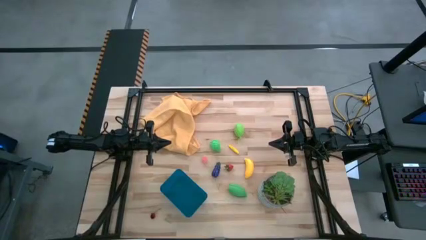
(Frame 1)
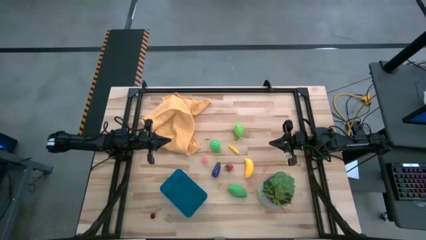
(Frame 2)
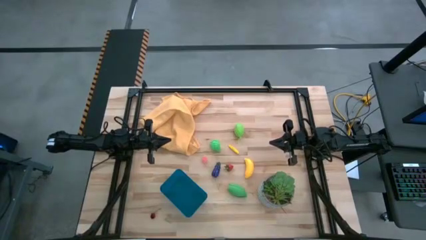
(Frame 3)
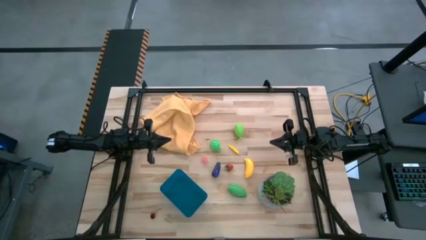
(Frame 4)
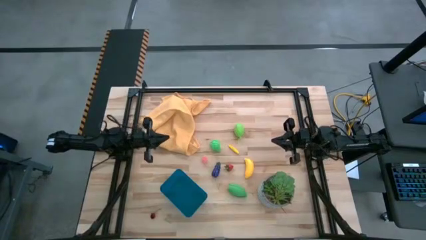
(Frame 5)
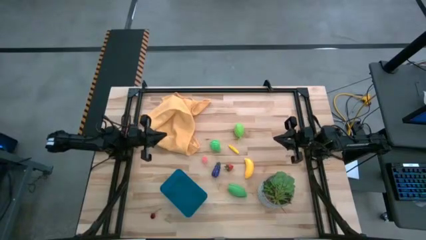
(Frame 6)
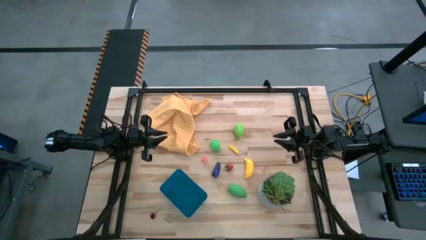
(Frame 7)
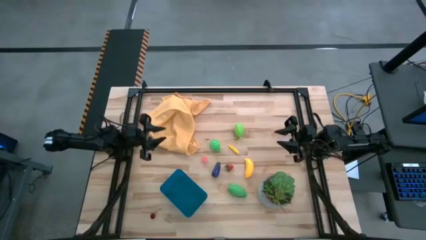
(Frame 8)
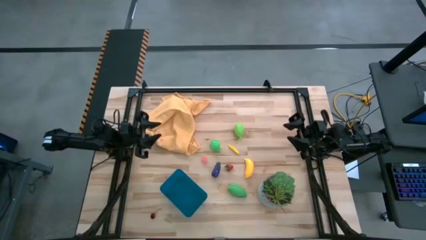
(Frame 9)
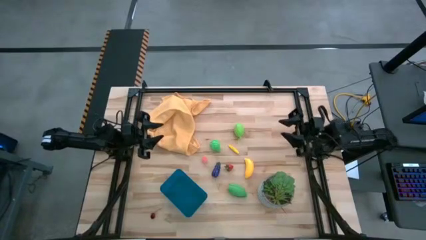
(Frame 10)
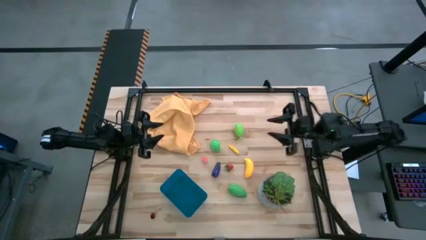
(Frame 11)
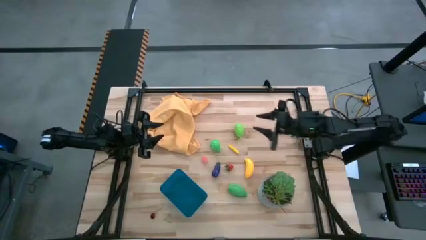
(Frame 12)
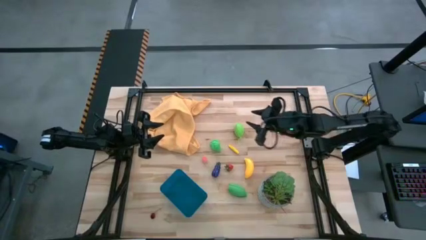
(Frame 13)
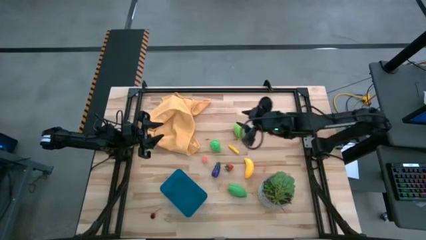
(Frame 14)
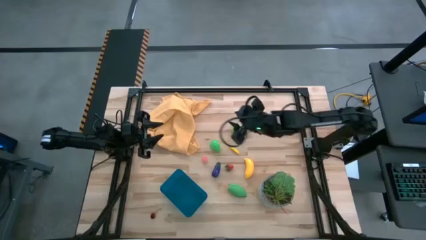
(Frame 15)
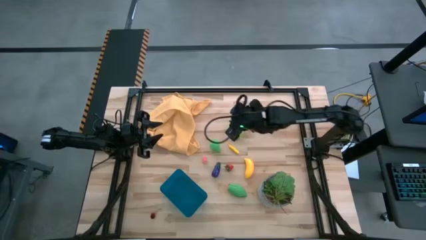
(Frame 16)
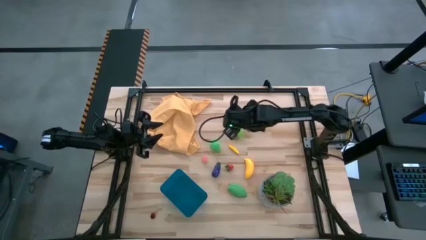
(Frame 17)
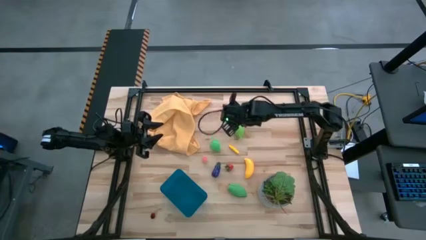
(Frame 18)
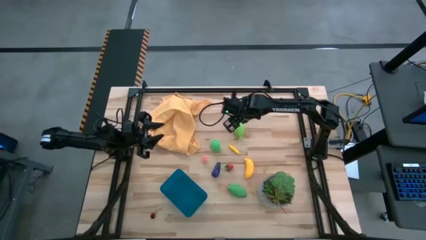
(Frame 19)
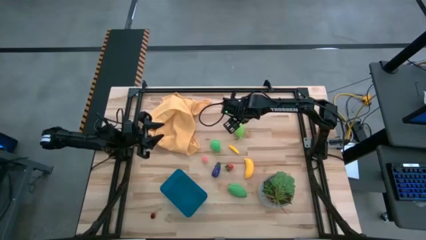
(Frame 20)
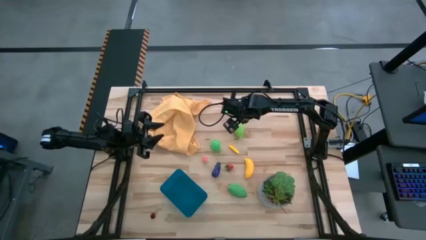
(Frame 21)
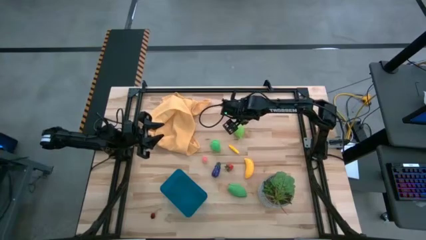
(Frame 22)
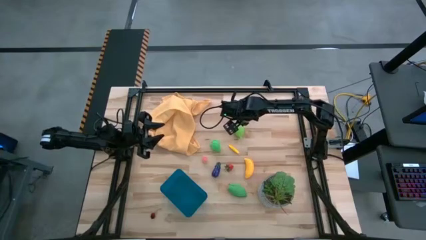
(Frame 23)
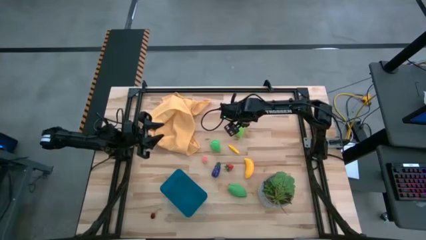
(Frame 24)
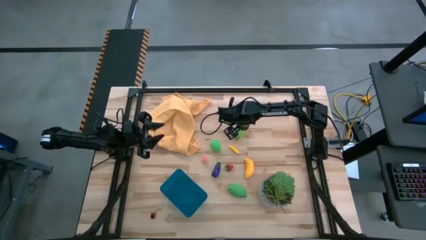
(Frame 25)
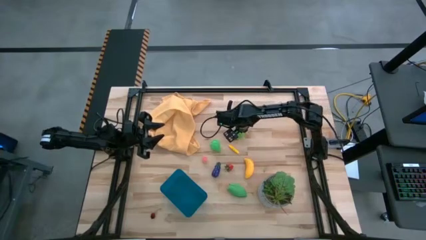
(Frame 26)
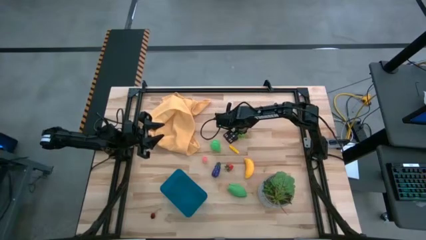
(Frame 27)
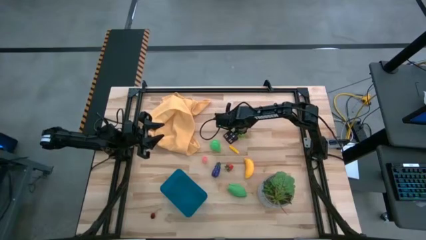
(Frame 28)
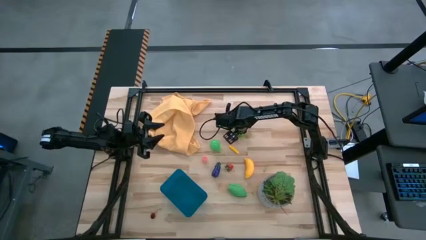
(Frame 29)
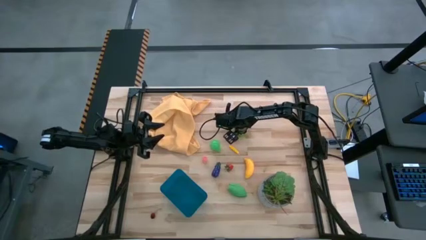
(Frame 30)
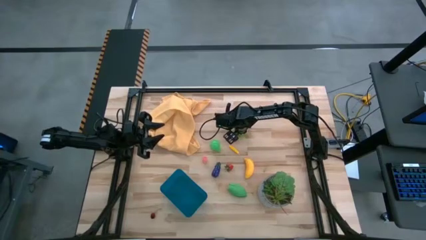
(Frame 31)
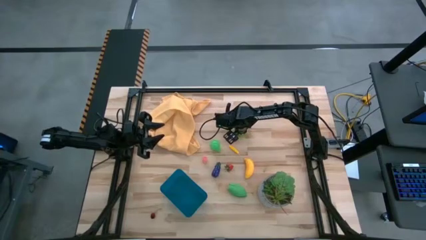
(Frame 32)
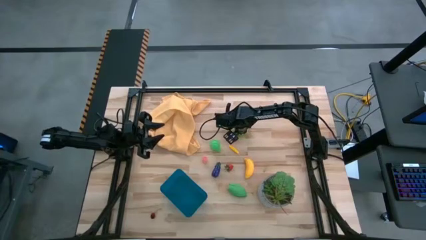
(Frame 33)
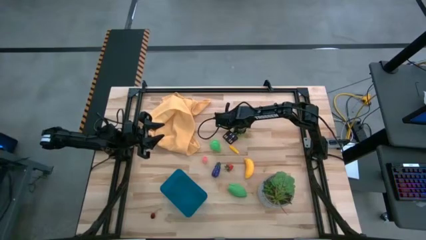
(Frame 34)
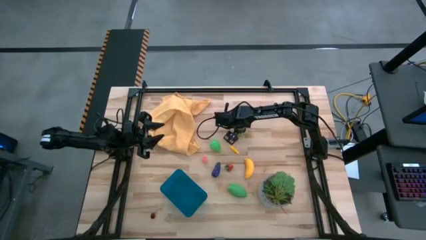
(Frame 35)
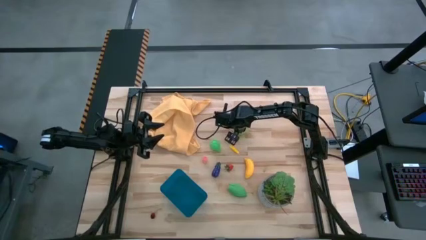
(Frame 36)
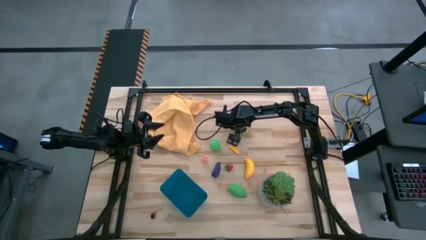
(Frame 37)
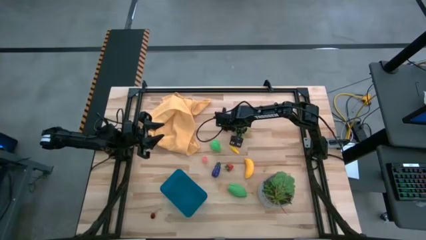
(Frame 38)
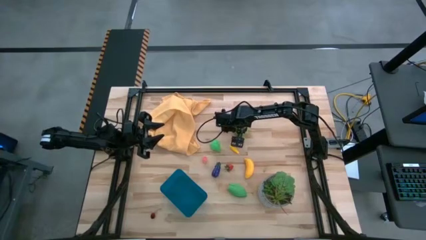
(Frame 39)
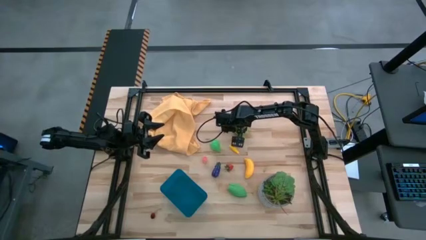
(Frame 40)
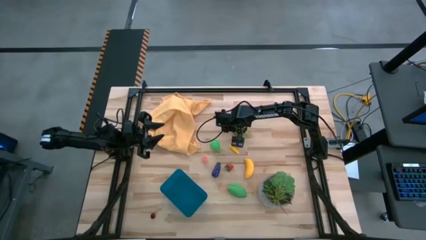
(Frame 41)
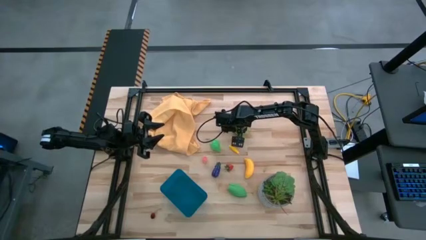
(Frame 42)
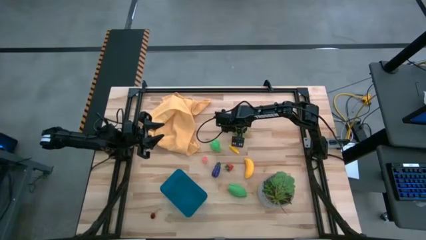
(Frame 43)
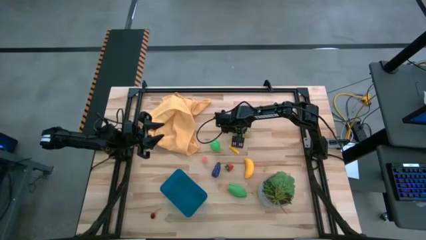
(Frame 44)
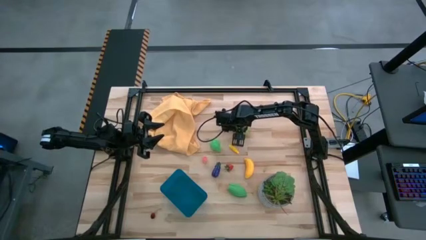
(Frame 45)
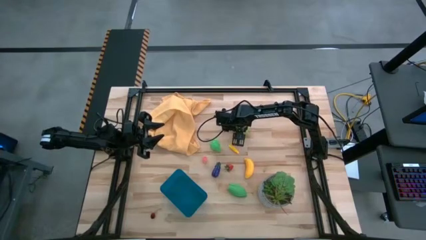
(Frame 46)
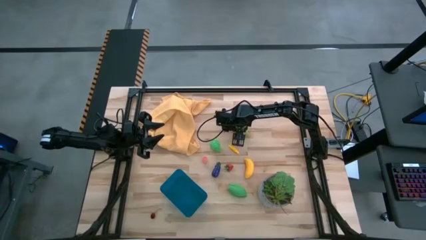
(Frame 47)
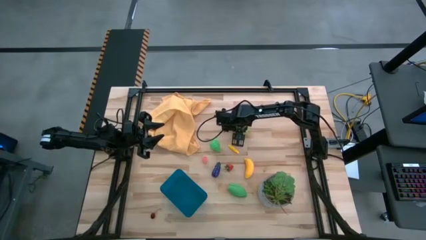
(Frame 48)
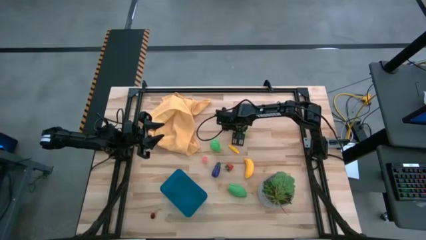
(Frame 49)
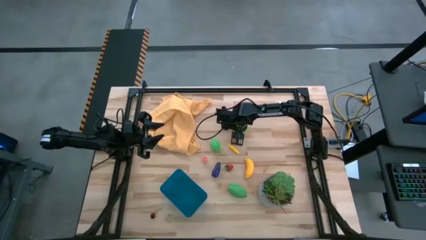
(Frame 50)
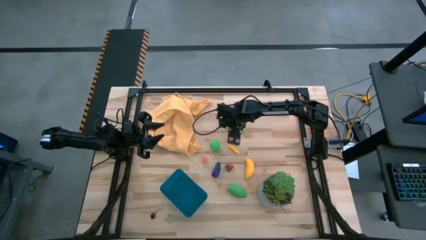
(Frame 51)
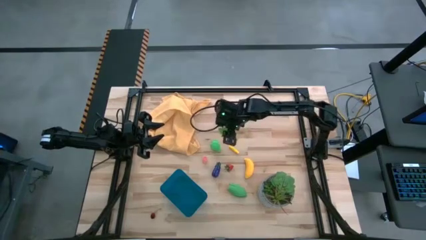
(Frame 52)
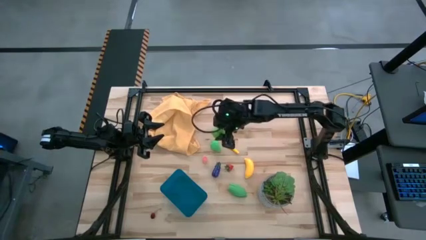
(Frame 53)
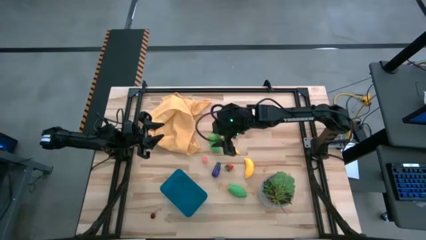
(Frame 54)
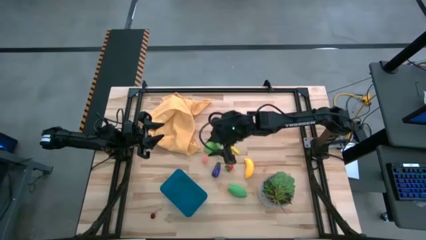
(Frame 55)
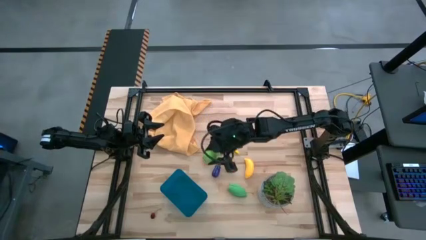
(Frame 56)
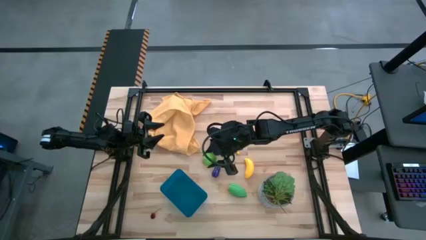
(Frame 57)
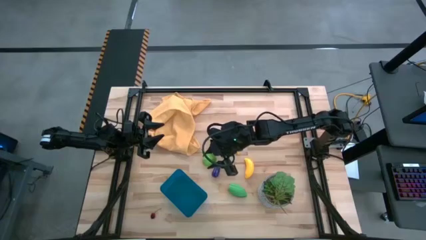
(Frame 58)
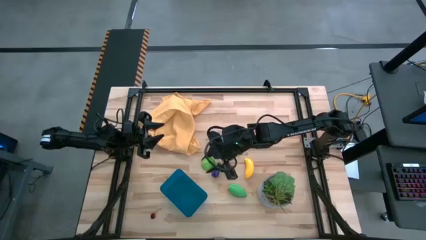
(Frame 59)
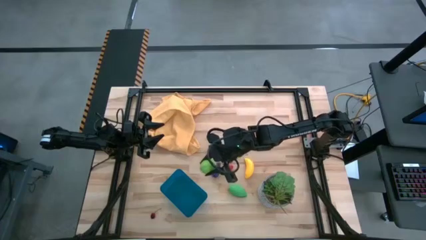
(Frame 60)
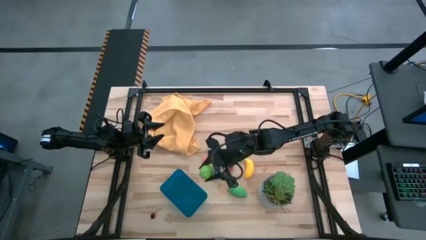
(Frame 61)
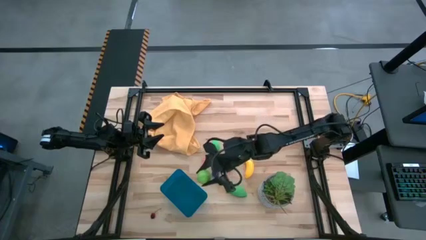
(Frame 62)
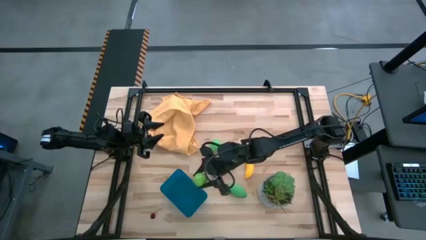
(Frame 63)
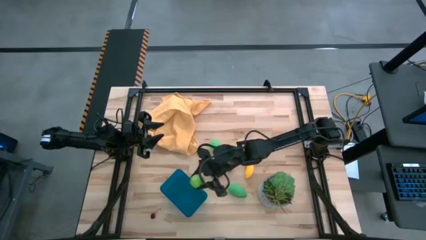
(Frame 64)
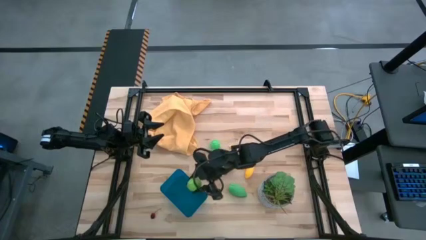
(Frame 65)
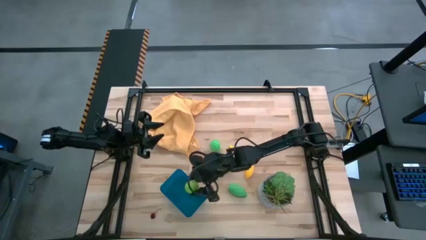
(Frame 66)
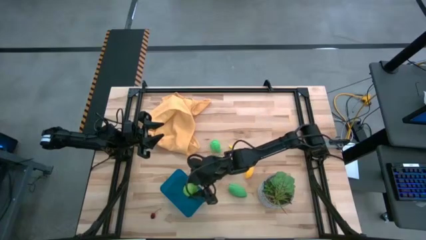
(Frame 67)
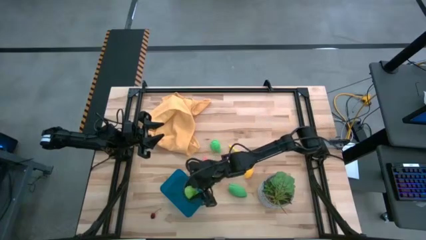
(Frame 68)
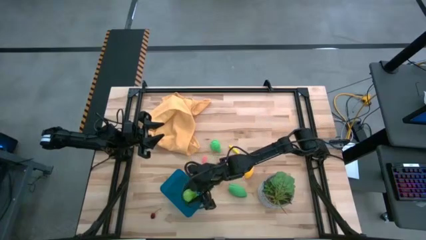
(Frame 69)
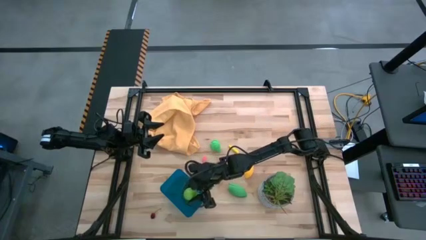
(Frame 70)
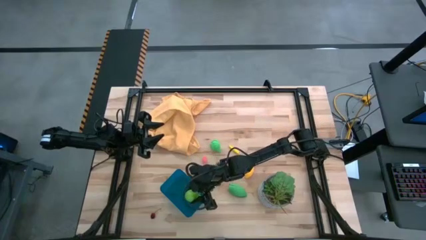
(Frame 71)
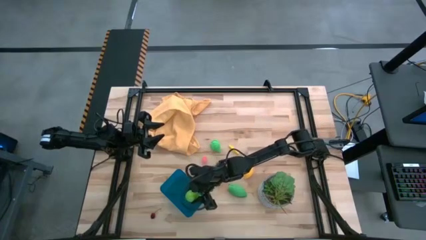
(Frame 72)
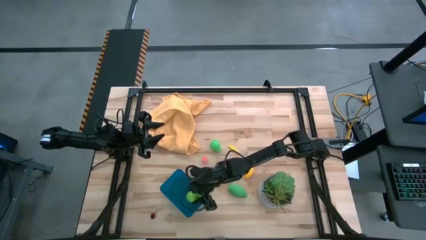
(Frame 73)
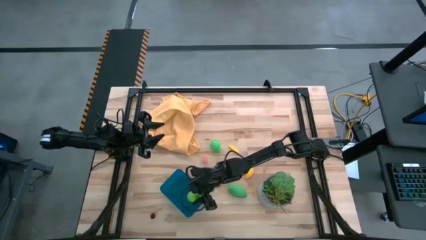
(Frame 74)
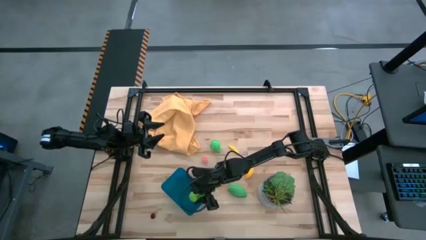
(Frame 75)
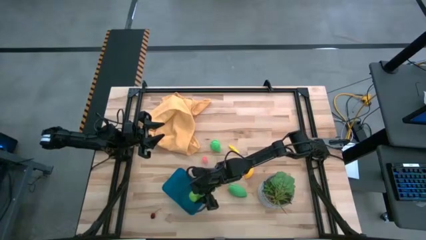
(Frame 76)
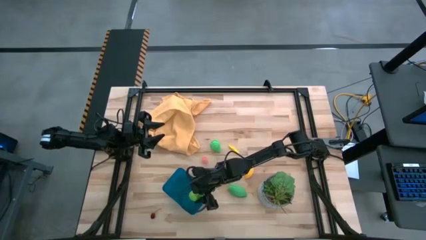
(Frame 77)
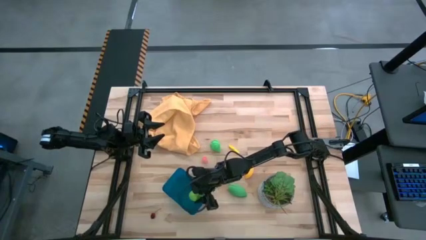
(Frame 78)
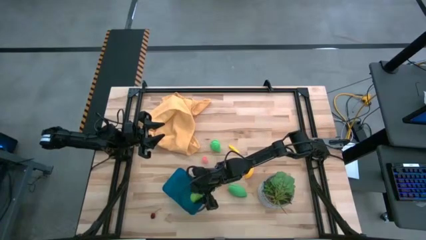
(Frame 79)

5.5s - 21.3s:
Task: Pick and placing Produce into tupperware
Put the melon into the blue bin
